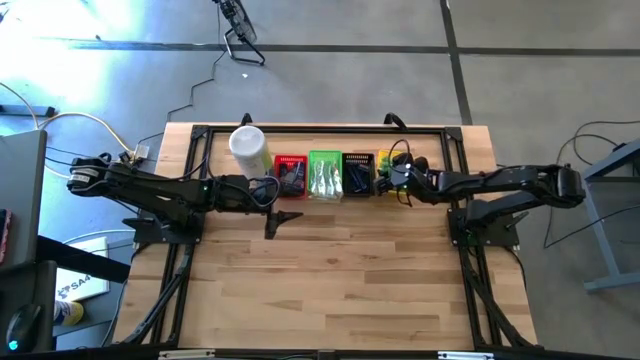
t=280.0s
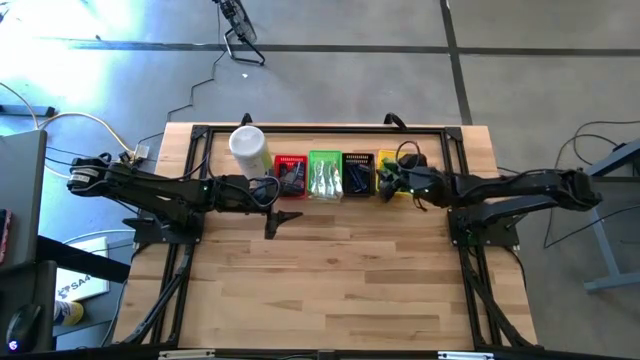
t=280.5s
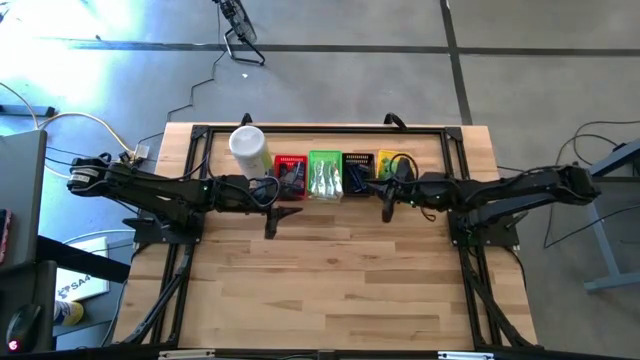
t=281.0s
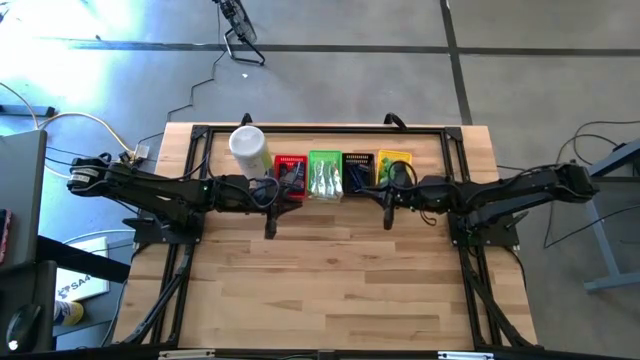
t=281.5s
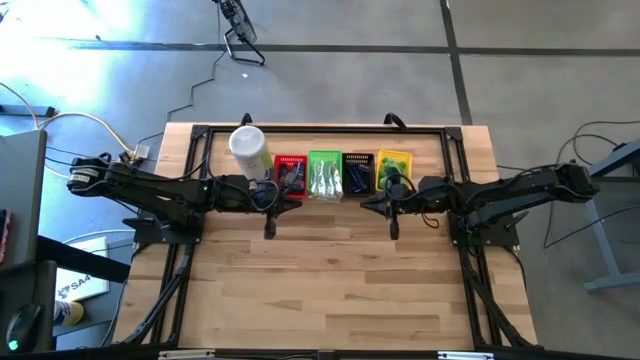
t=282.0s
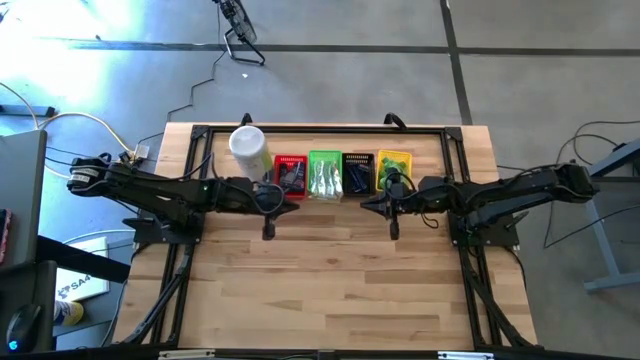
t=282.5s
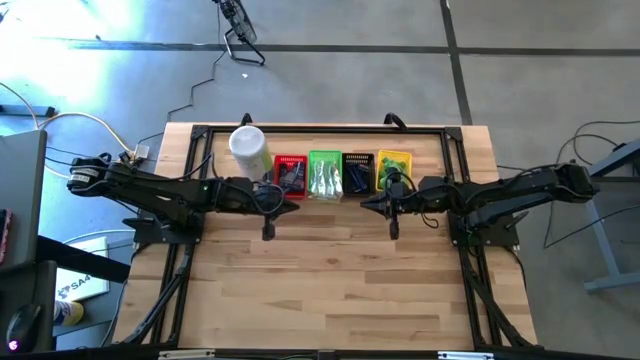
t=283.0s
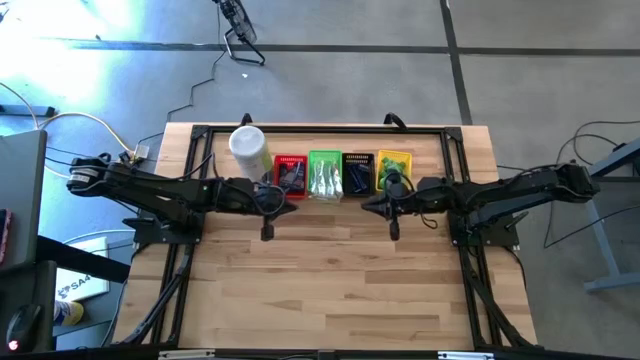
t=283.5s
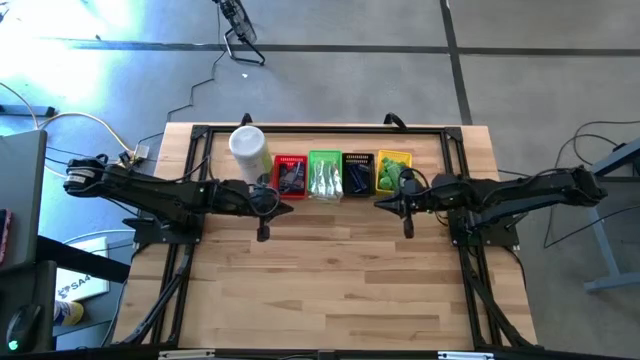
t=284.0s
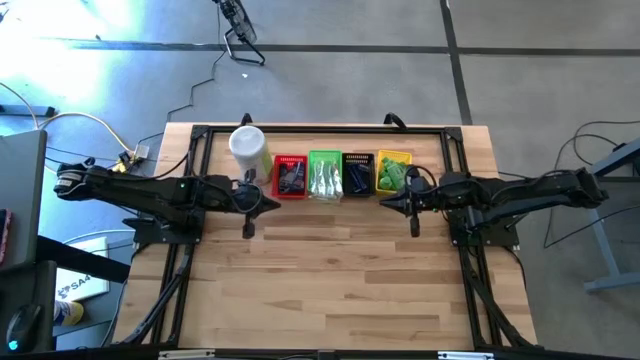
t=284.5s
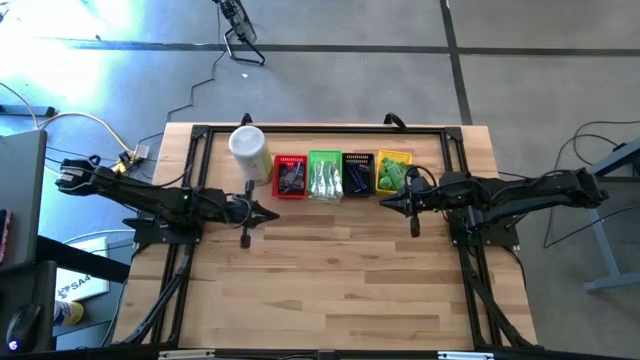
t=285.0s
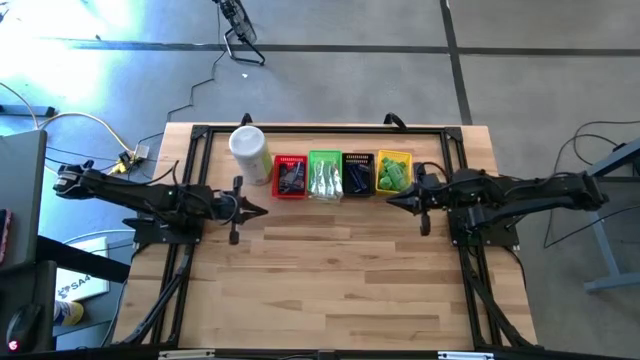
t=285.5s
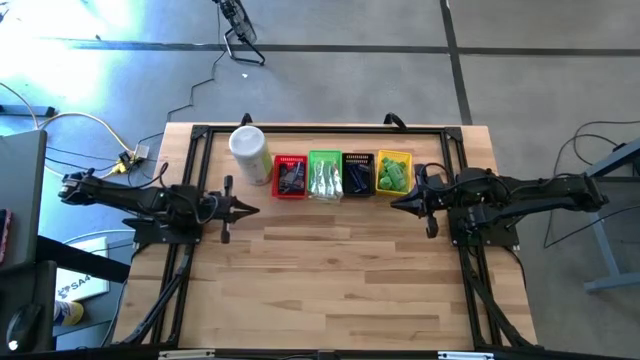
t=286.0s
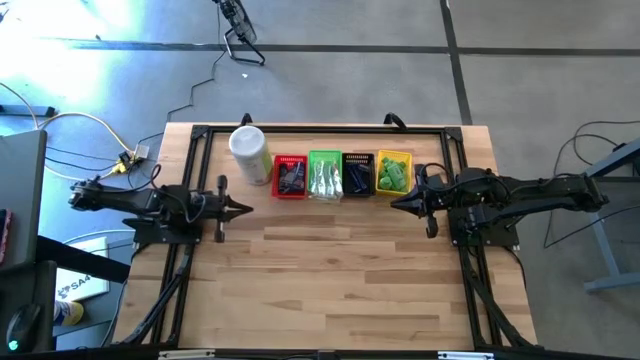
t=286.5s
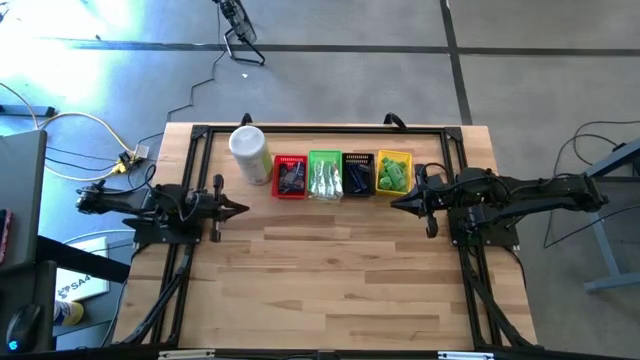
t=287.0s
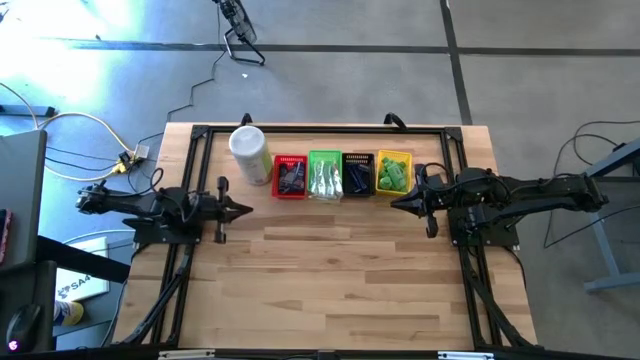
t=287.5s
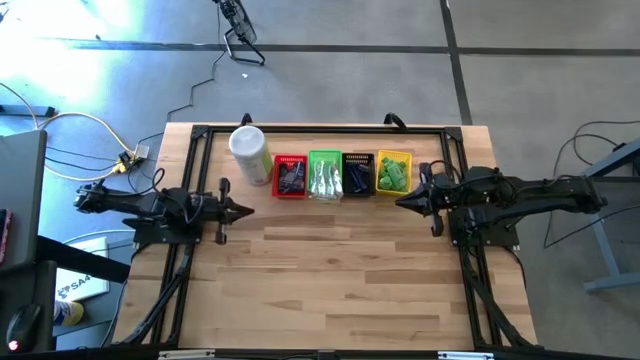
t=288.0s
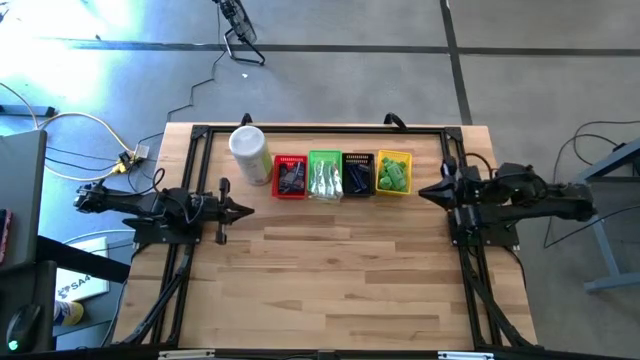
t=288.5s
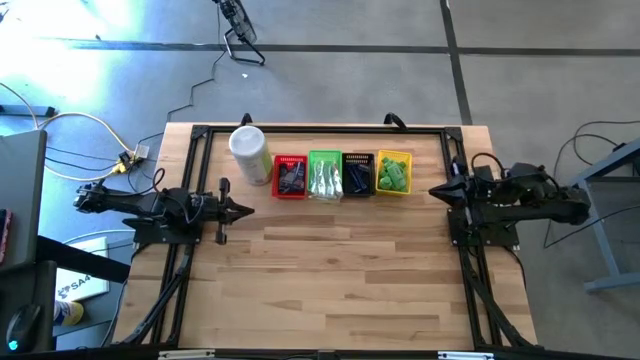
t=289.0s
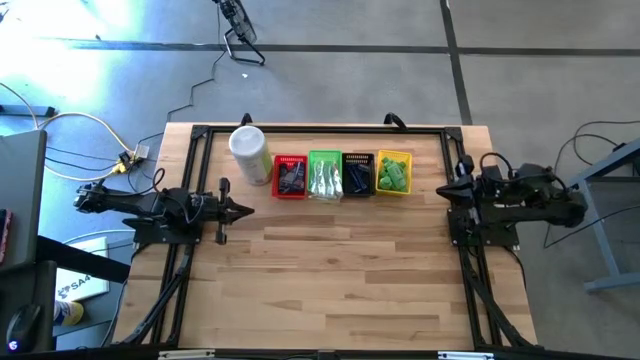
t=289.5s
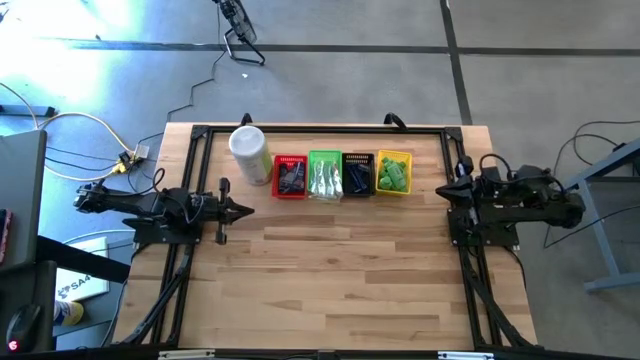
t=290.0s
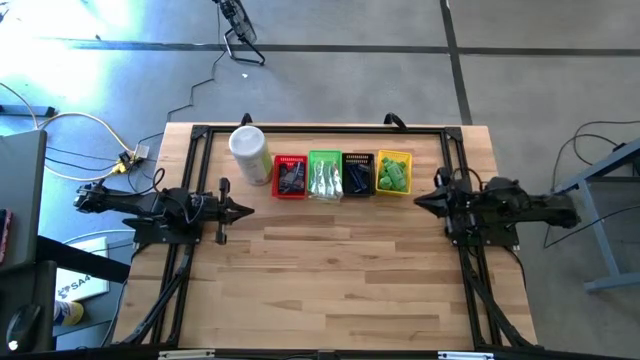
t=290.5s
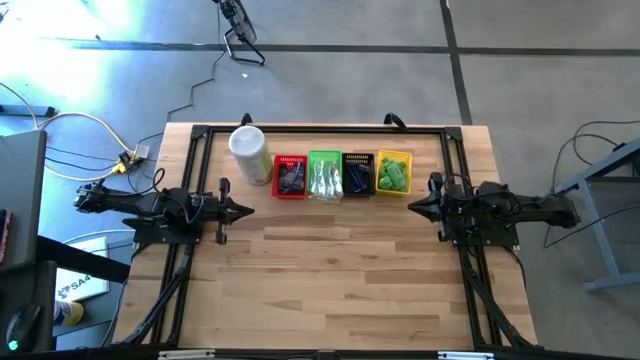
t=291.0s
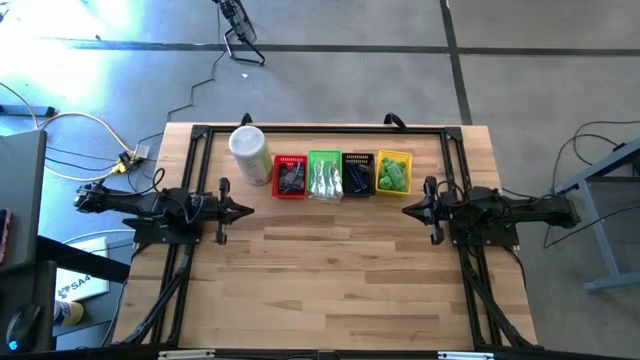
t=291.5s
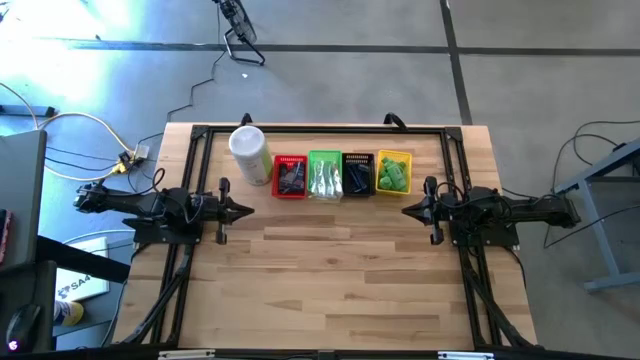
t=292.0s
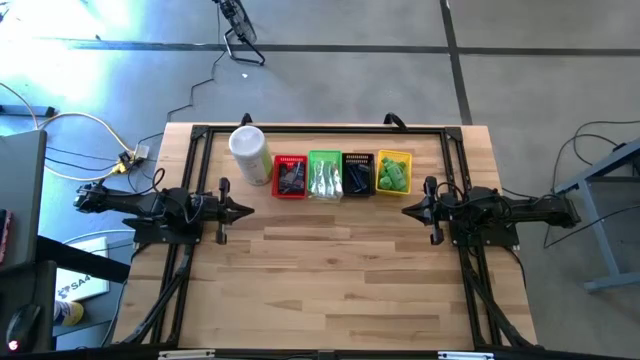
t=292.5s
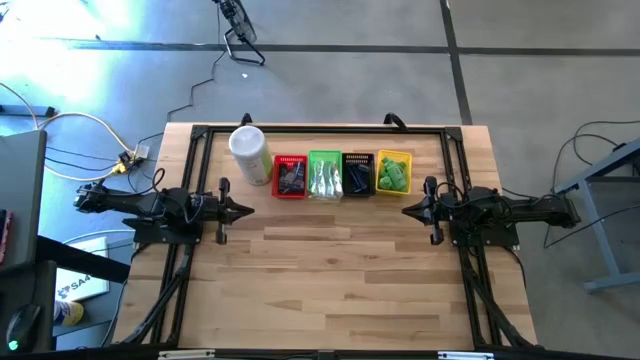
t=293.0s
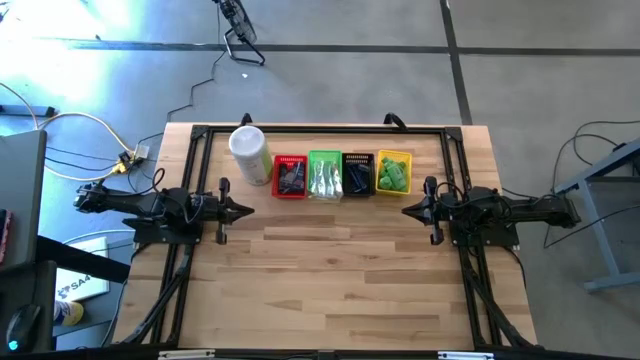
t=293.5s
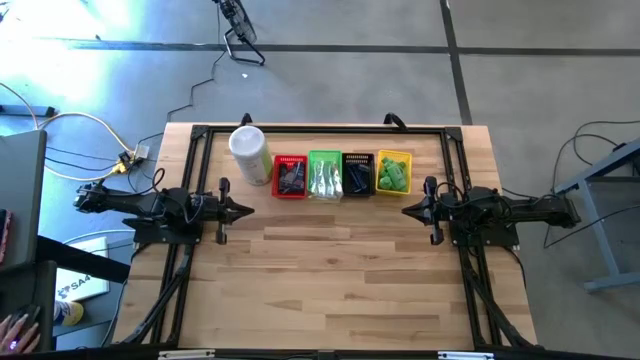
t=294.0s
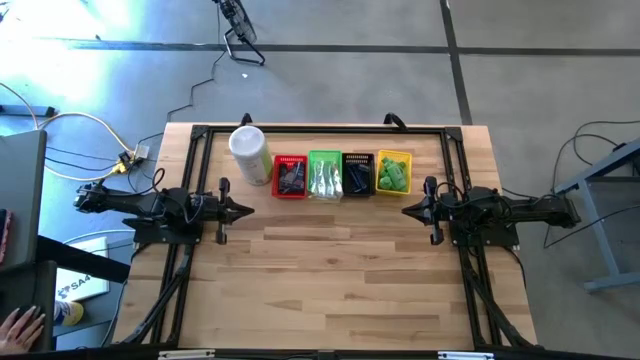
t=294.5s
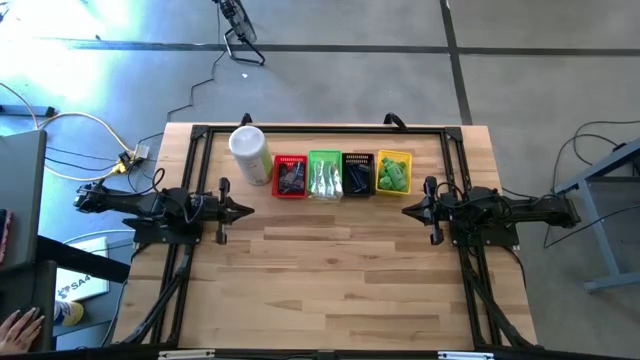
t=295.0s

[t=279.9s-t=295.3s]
Task: Pick & Place Travel size toiletries
Return to Home Position

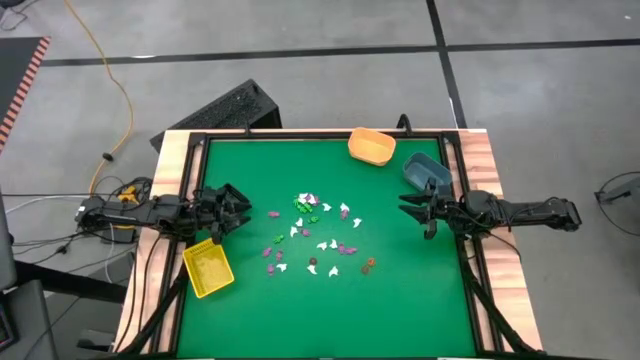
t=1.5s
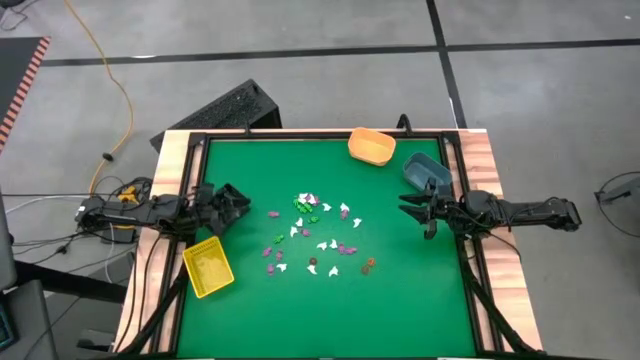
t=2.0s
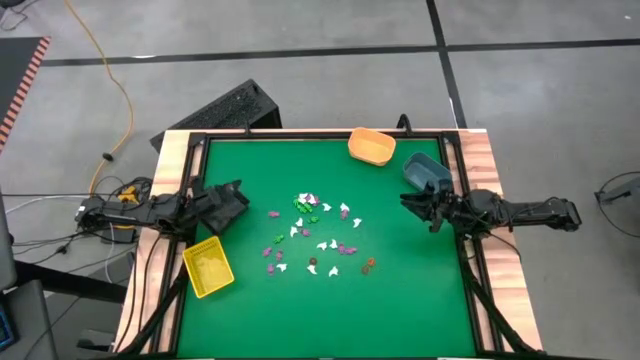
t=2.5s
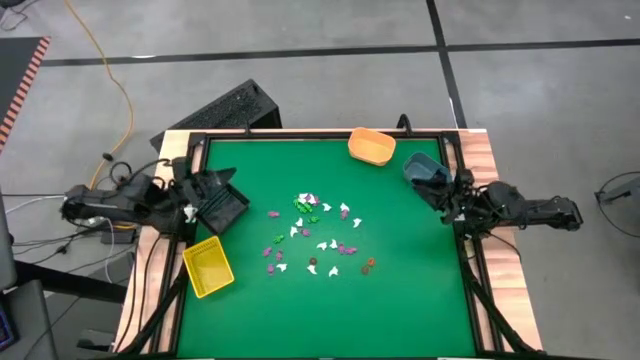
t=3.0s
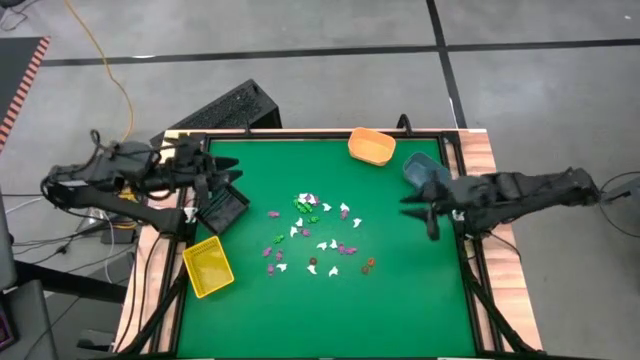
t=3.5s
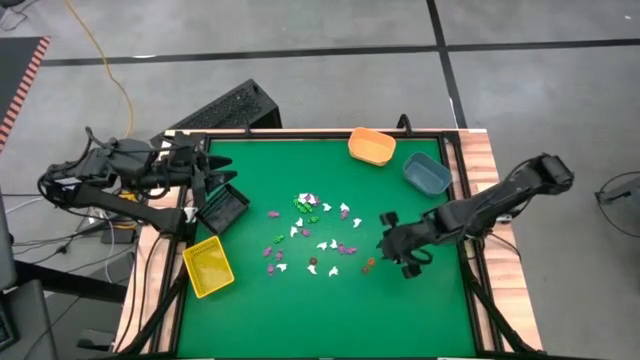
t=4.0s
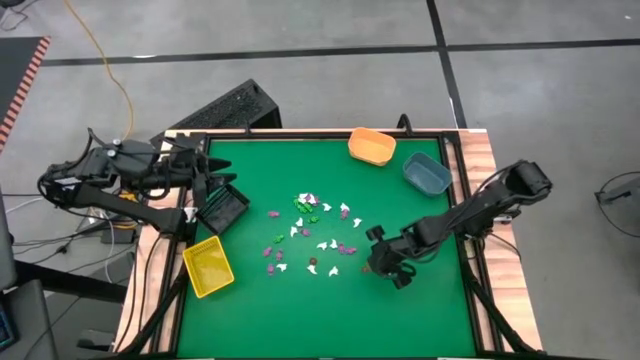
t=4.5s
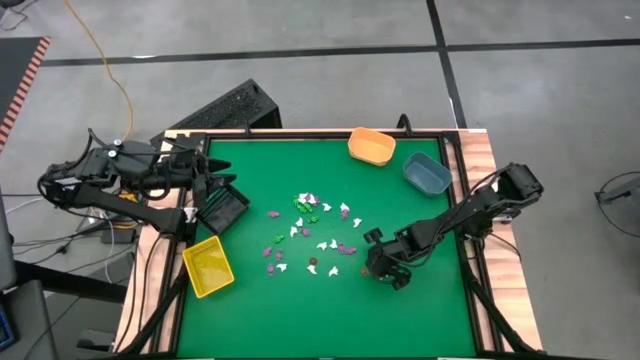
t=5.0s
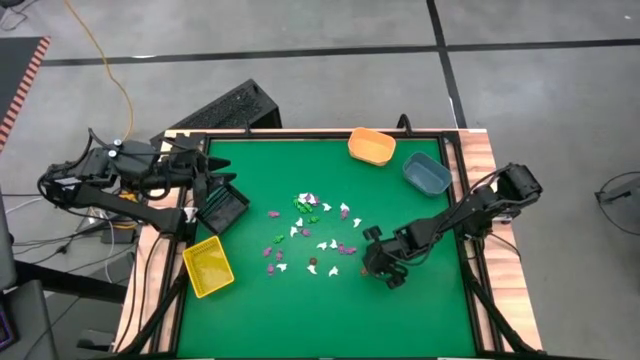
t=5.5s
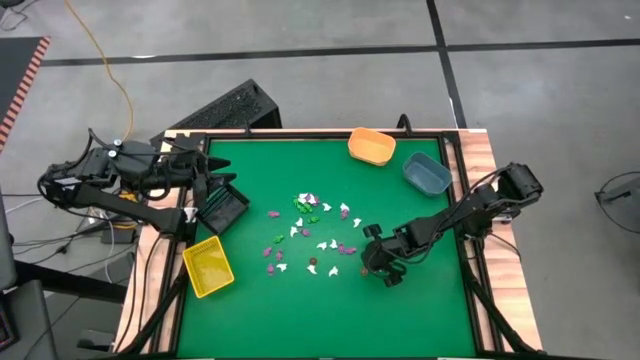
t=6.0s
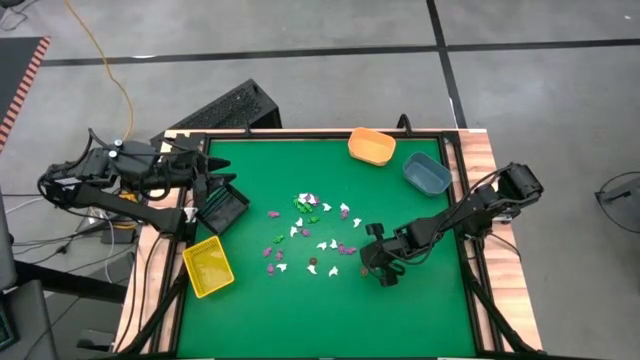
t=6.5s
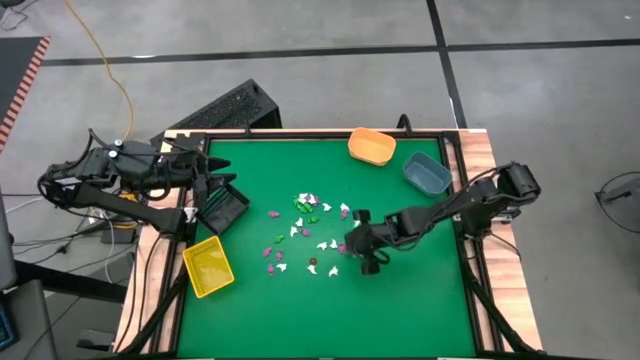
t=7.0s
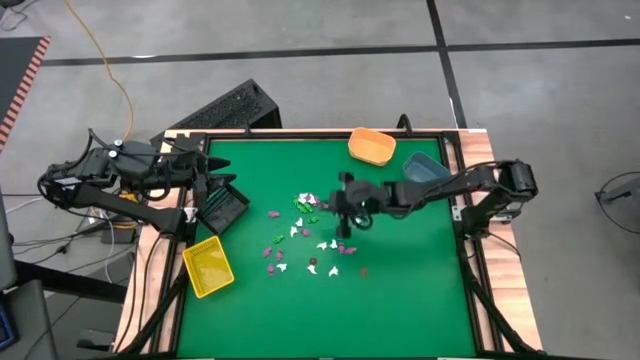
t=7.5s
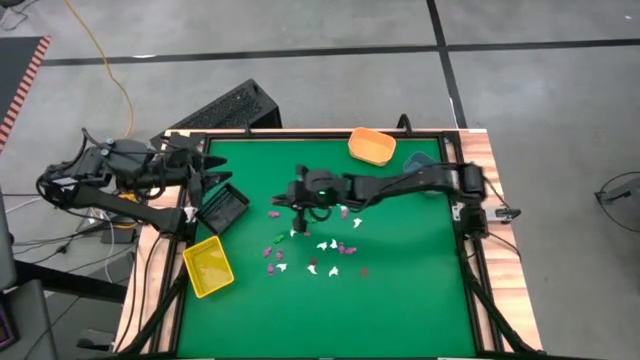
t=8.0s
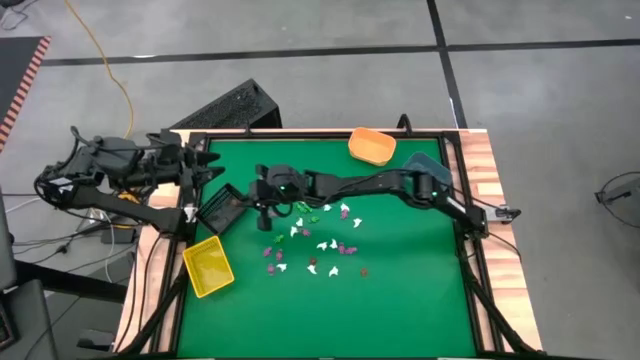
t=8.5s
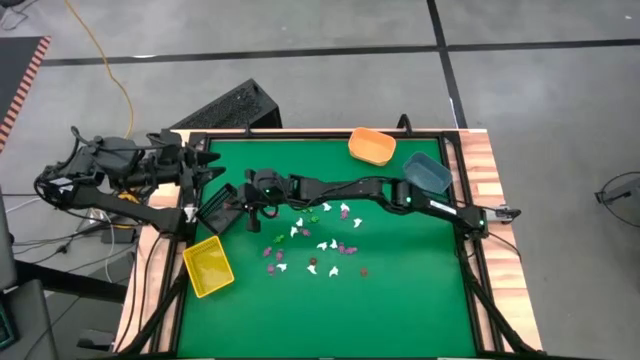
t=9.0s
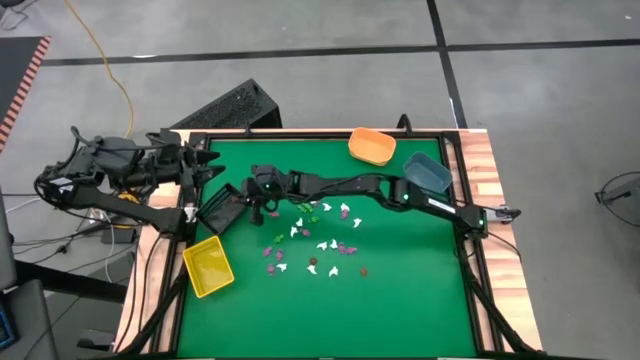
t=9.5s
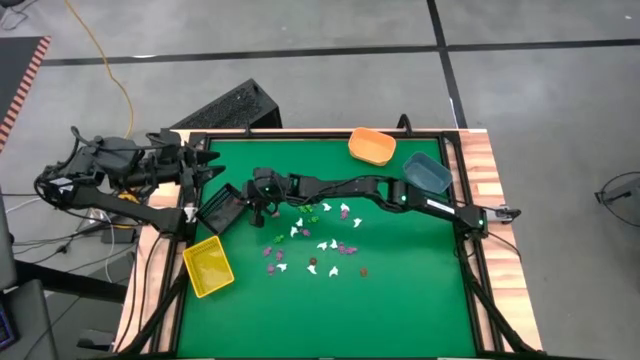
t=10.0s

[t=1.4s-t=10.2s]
Task: Sort Halloween decoration
Put the orange pumpkin toy into the black bin
